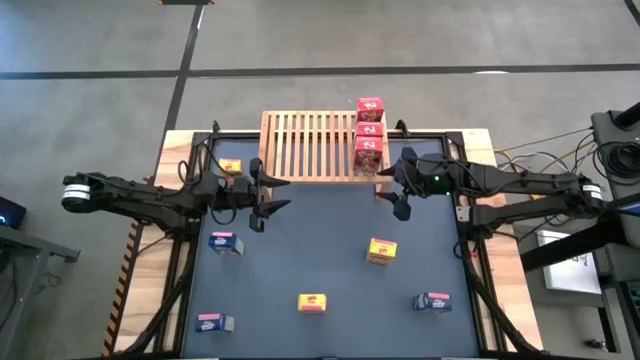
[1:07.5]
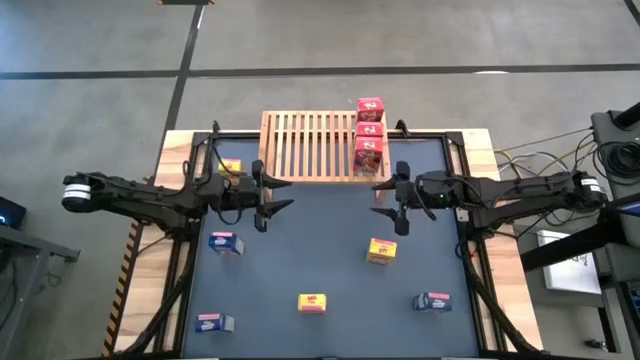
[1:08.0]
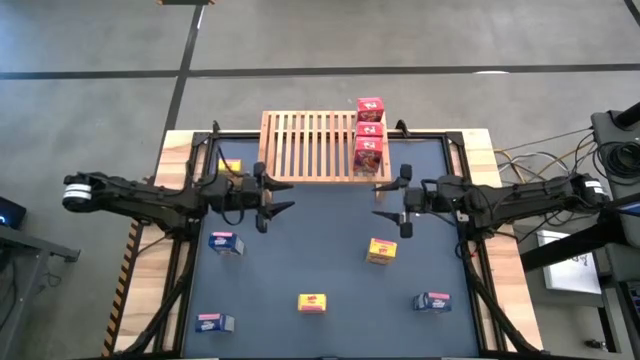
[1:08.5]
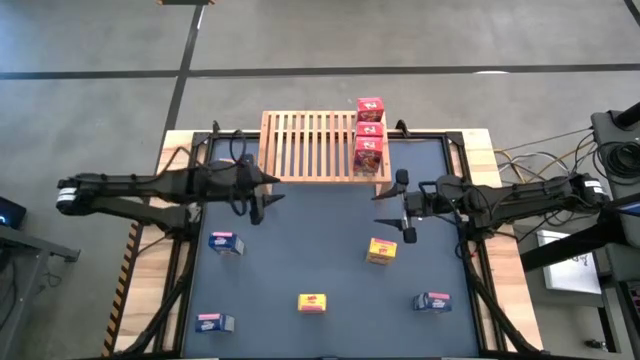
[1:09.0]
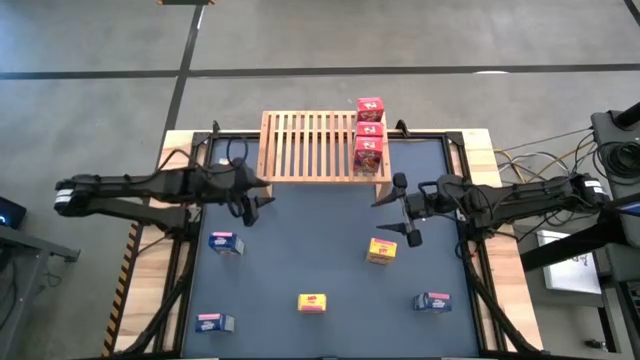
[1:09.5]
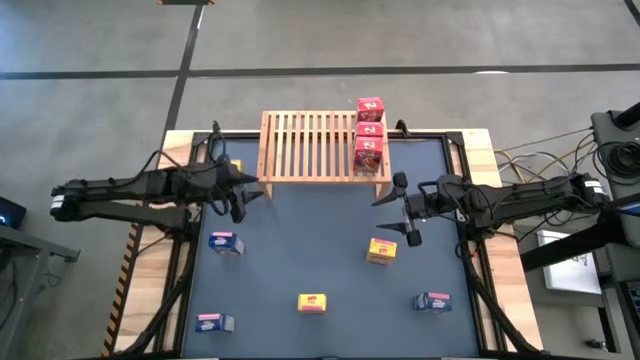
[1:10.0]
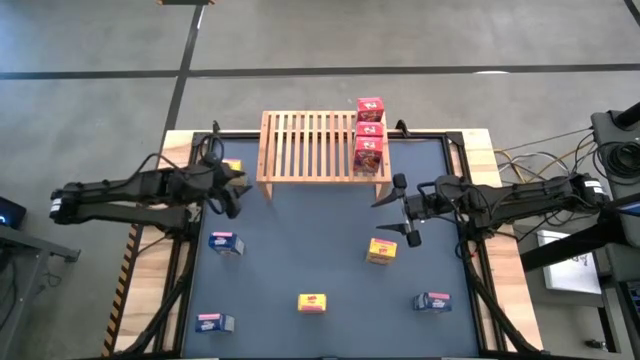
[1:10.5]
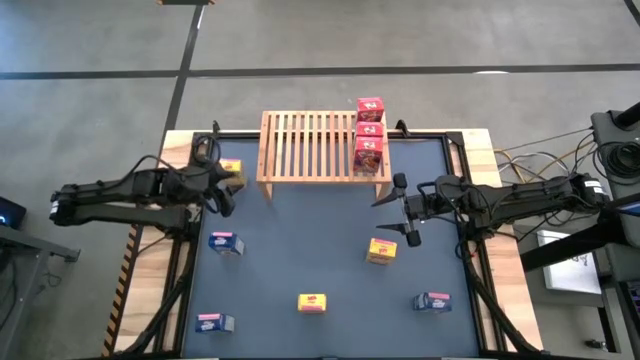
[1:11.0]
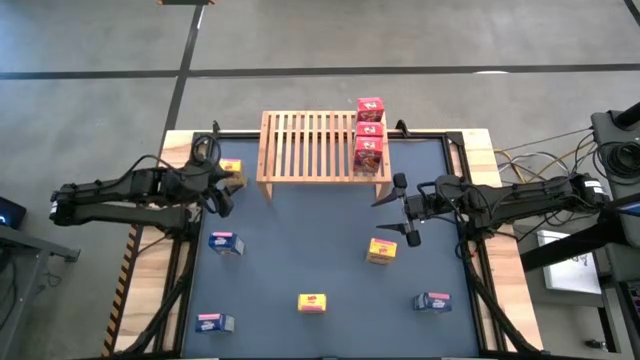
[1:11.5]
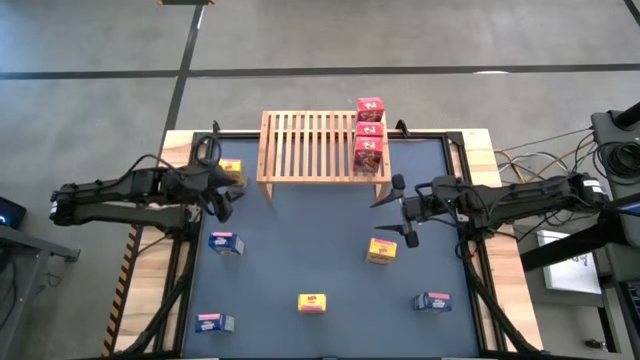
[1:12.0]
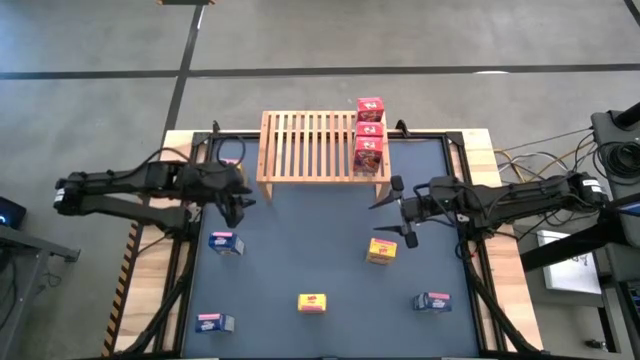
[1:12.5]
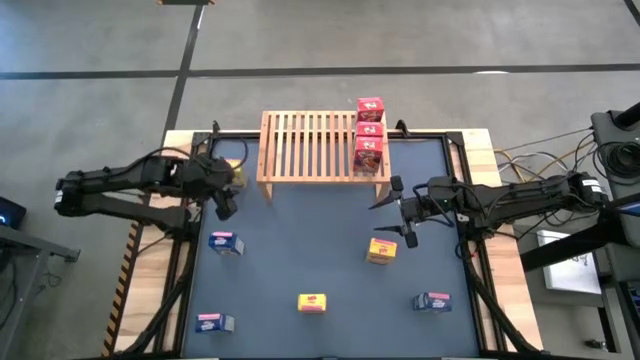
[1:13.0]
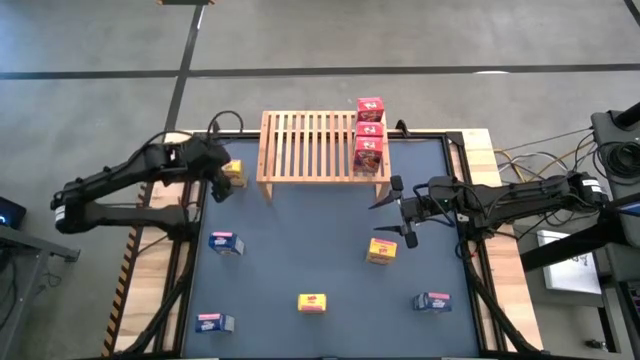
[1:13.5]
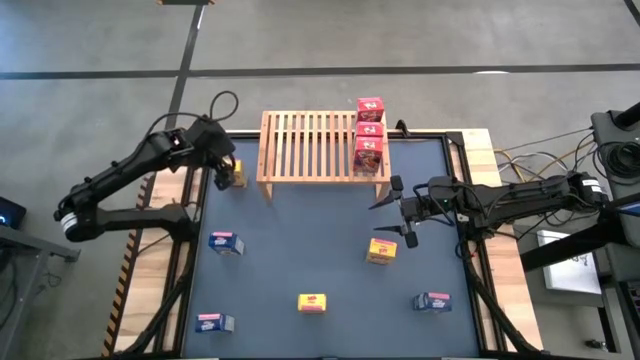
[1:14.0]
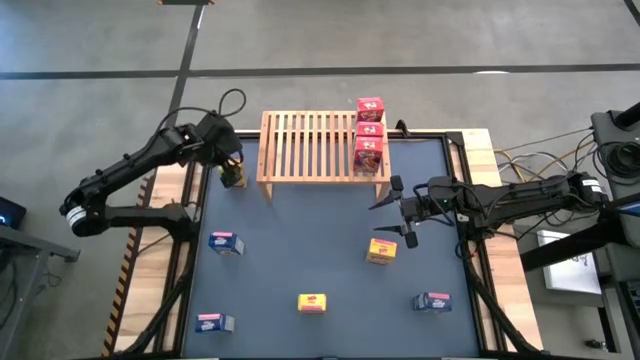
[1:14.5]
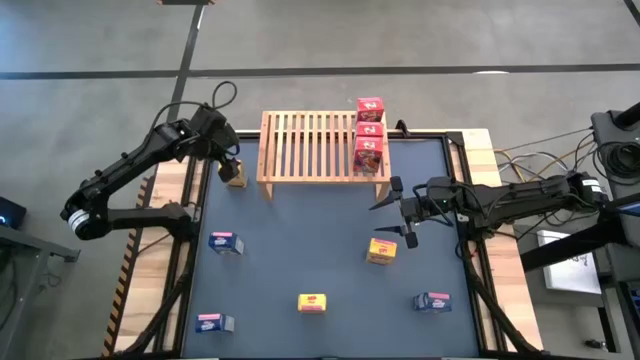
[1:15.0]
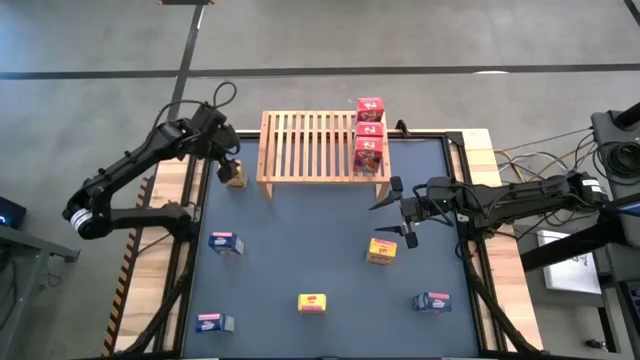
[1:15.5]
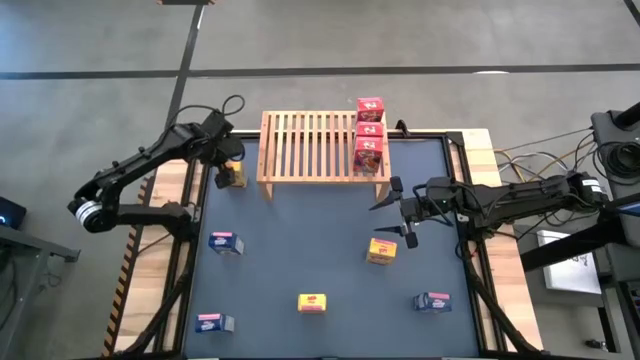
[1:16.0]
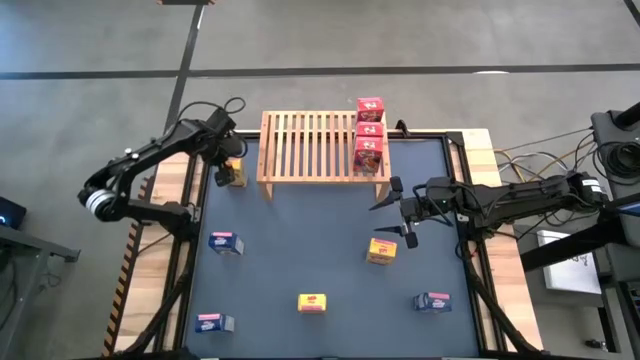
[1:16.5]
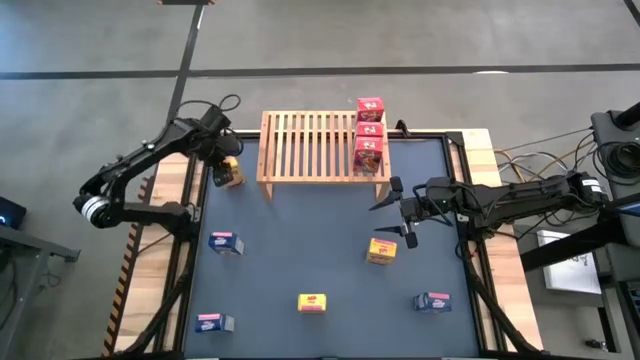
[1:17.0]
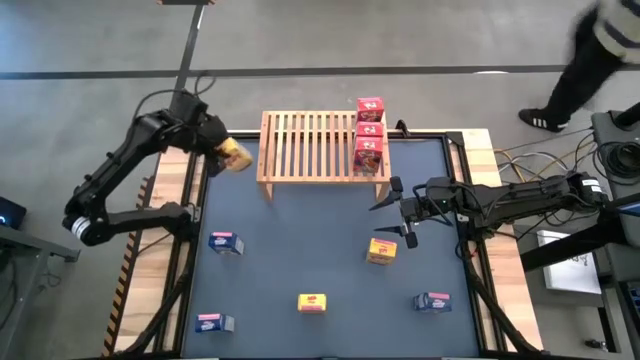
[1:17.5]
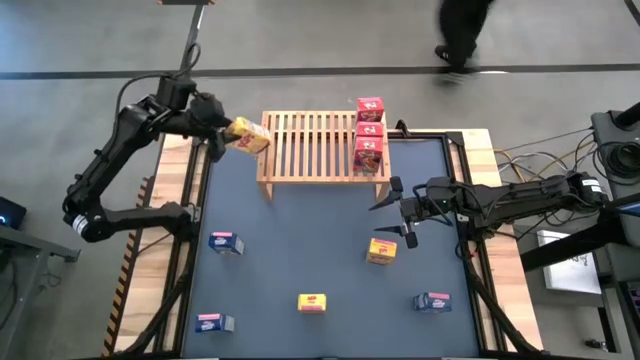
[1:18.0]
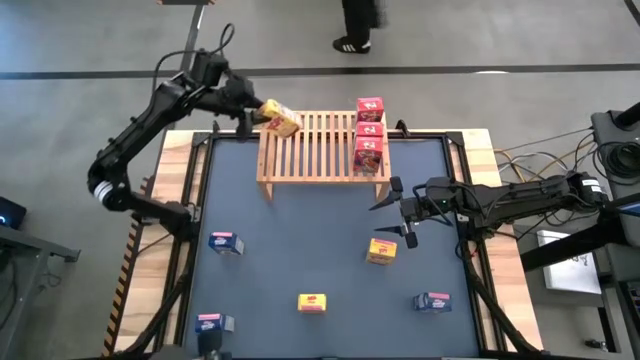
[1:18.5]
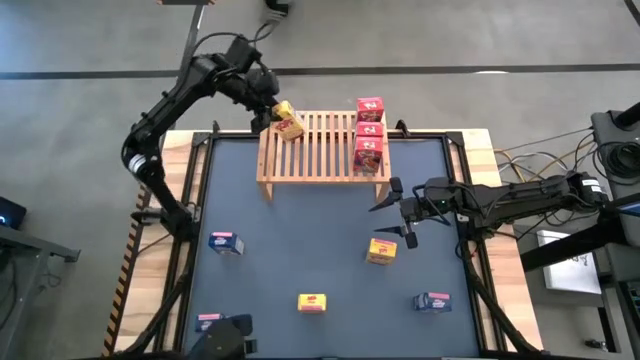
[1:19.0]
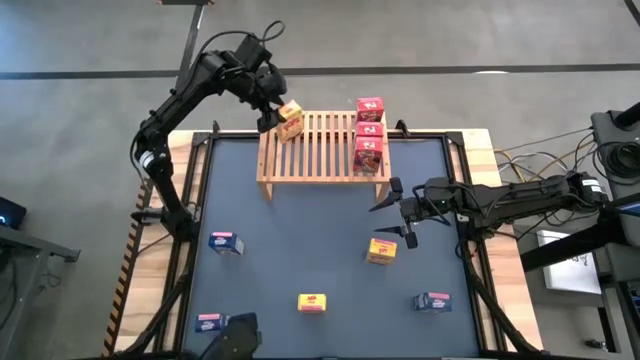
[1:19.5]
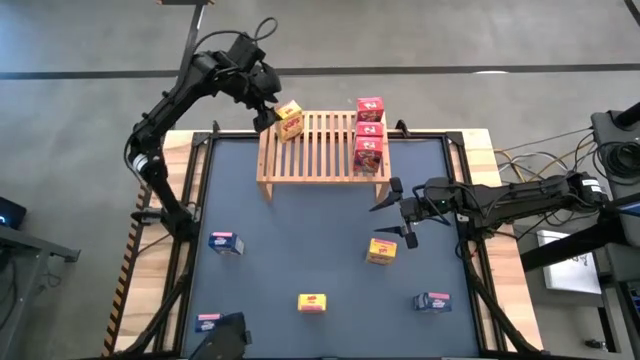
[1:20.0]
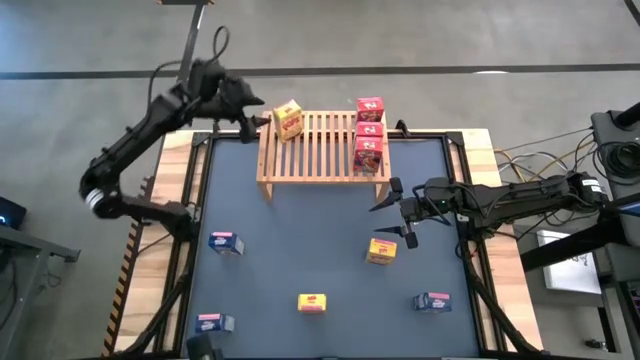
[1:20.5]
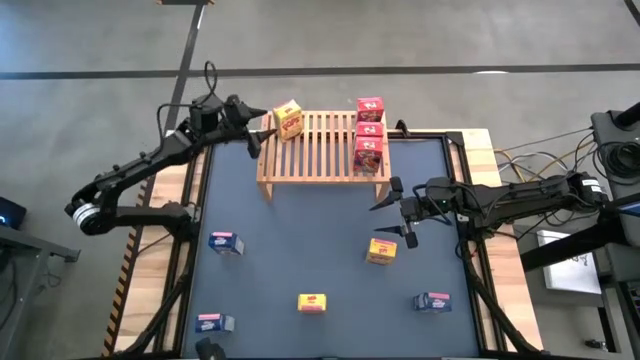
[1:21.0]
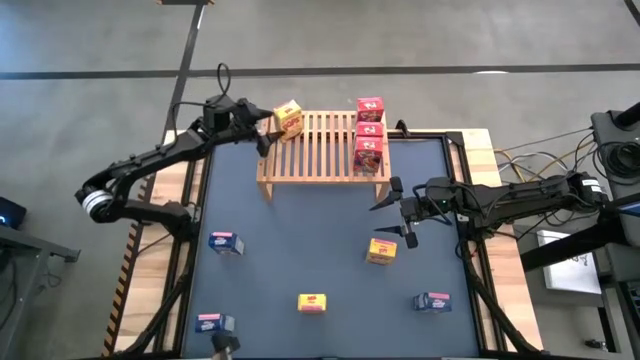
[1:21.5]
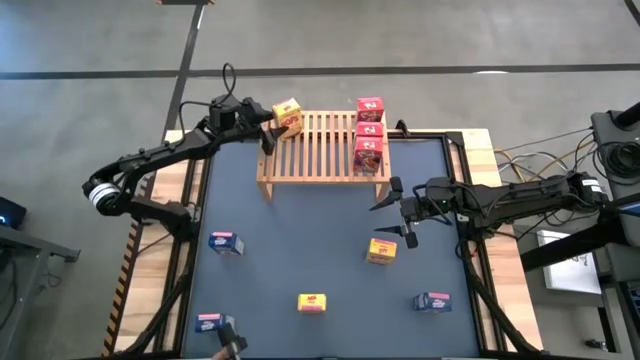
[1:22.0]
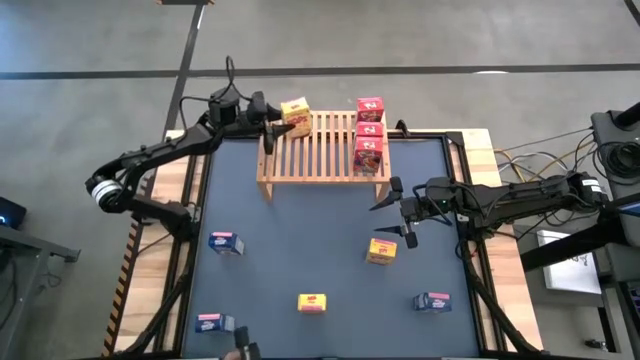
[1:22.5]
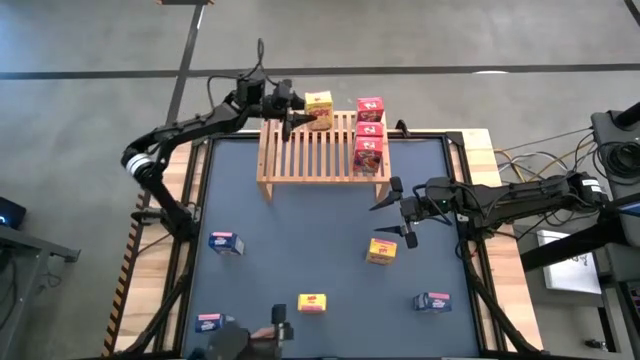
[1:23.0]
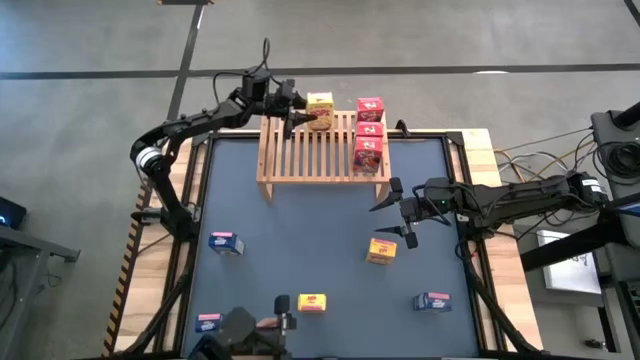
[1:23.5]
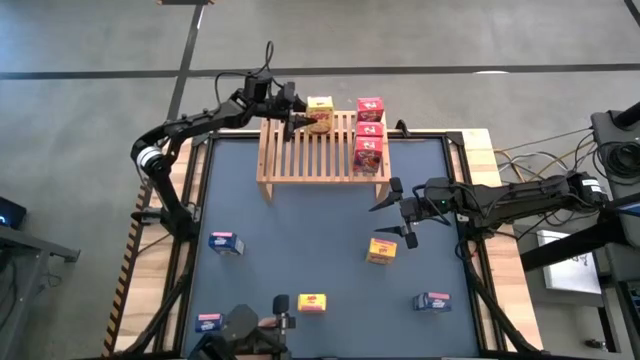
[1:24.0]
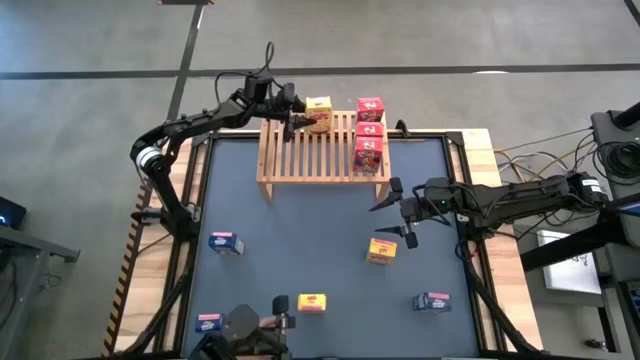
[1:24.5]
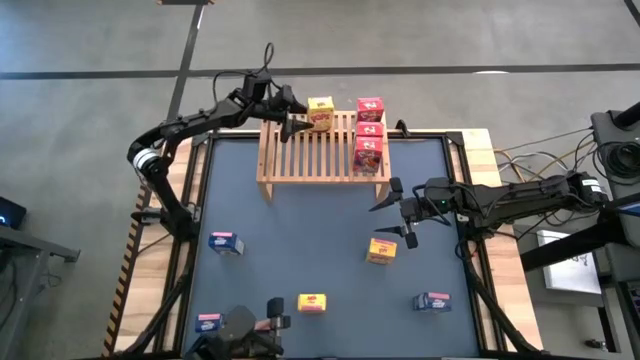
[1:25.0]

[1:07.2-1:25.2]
Task: Stack cereal on shelf
Put the top yellow cereal box on the shelf

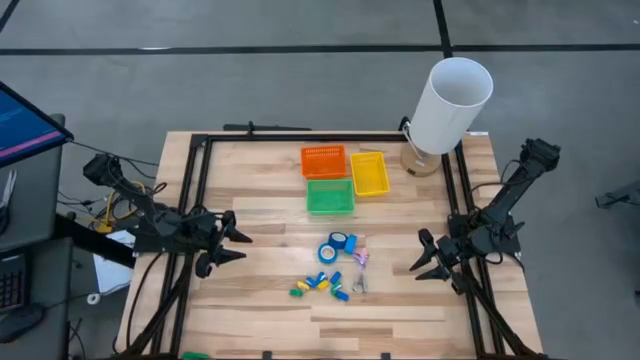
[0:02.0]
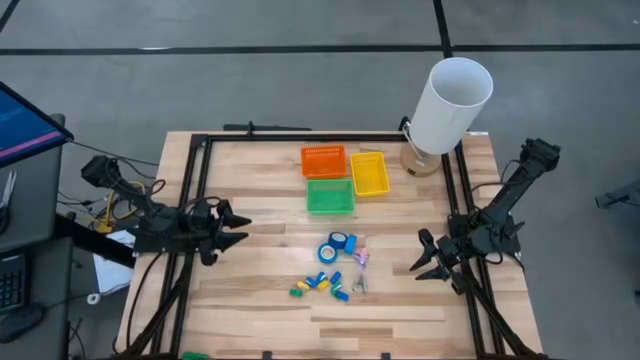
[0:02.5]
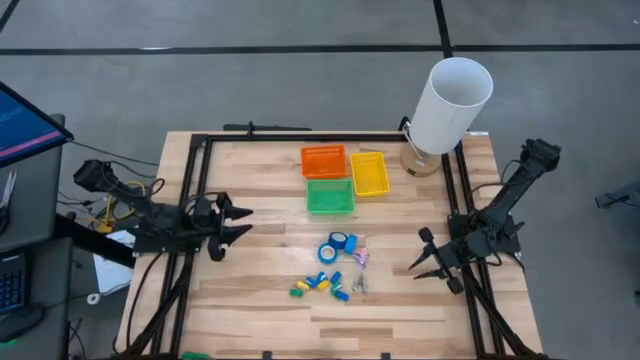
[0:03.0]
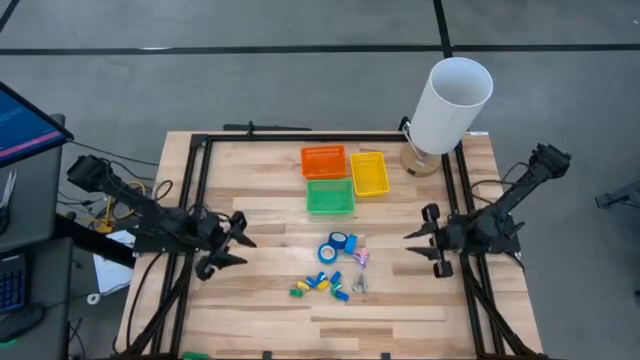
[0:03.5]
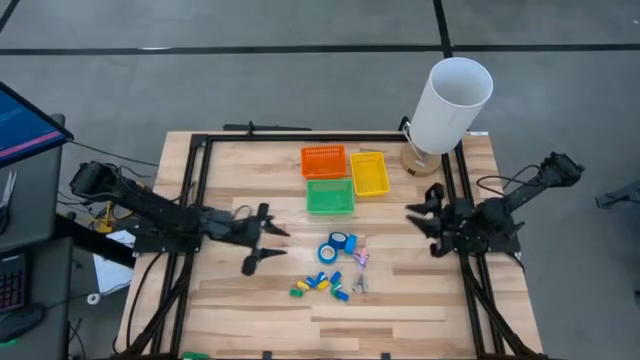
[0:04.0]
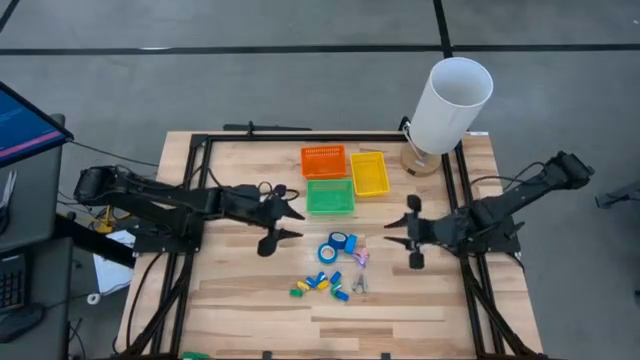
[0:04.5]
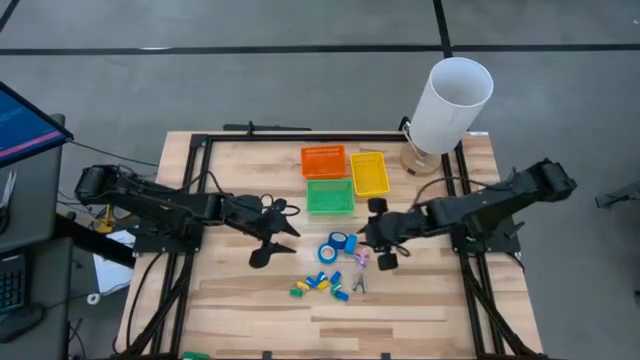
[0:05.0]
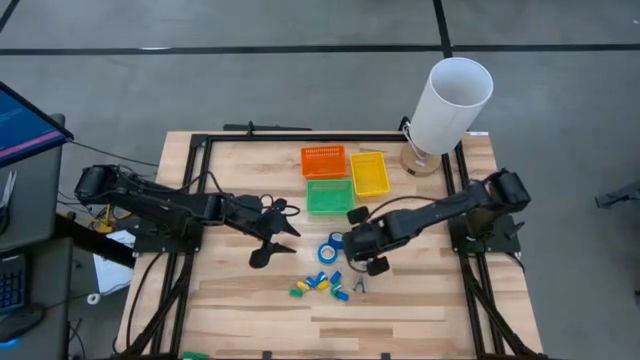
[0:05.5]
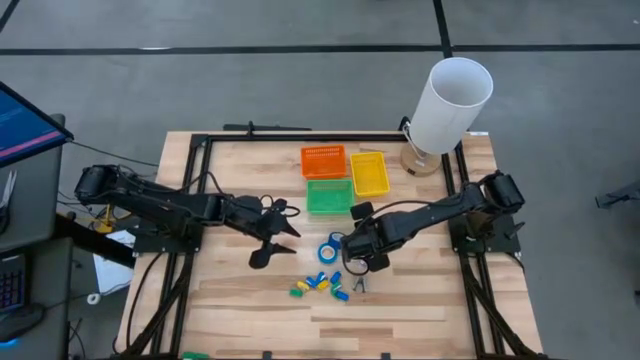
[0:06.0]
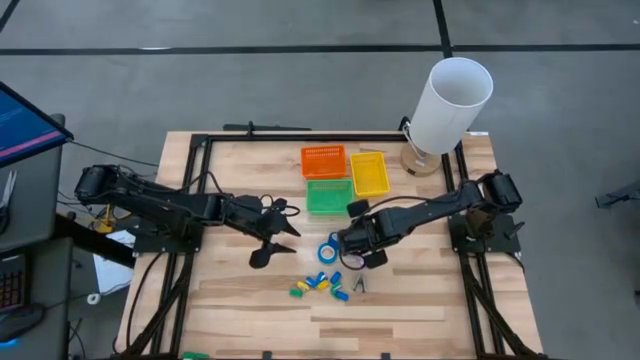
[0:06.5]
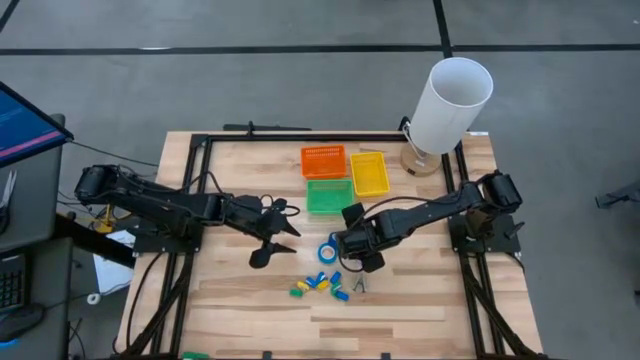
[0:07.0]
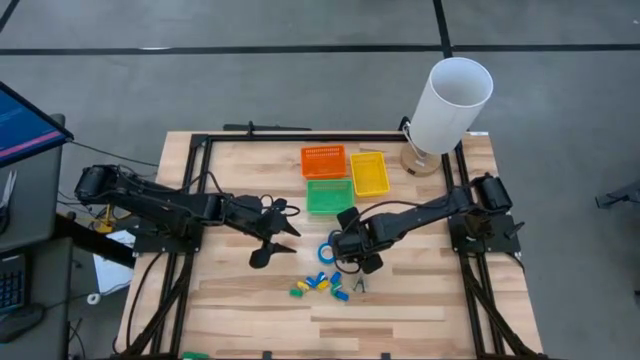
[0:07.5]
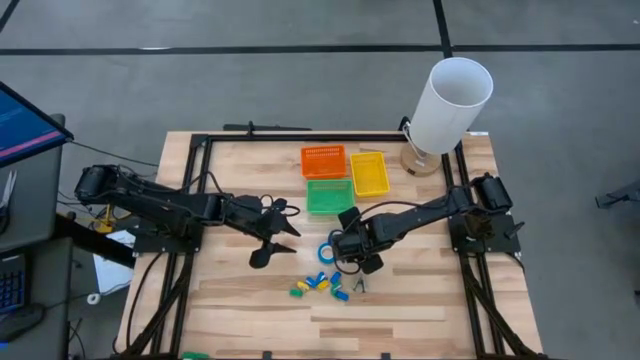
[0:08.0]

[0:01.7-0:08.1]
Task: Pick and place Stapler, Stapler remover, tape
Put the light blue tape into the yellow bin
